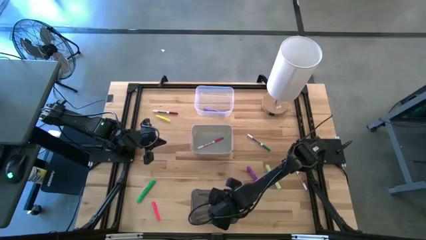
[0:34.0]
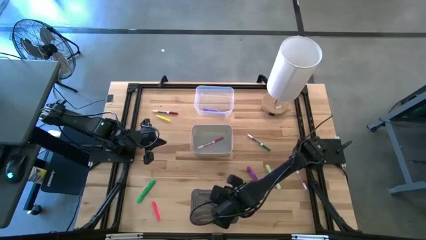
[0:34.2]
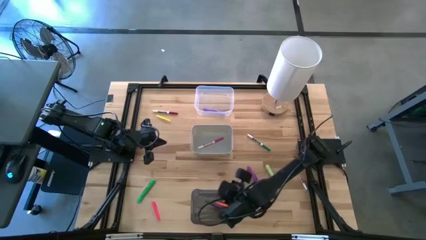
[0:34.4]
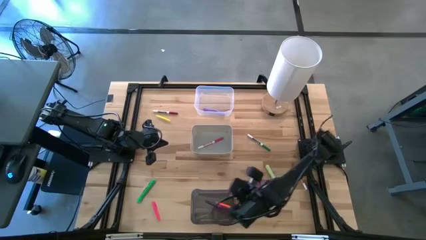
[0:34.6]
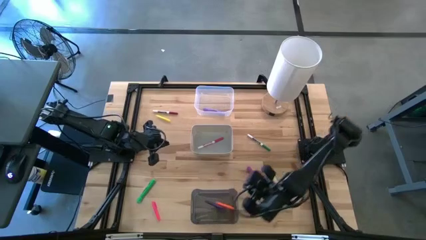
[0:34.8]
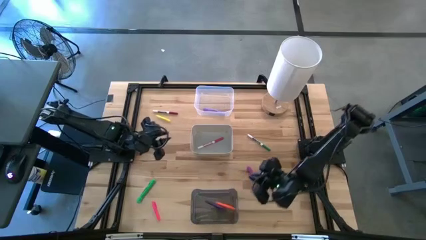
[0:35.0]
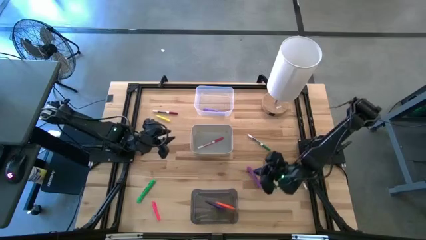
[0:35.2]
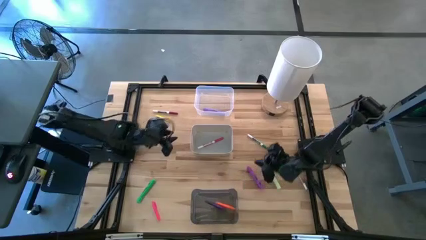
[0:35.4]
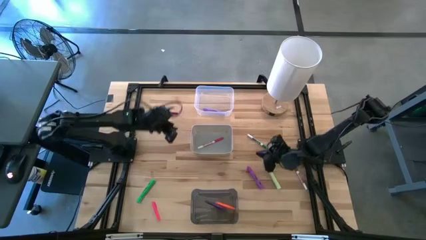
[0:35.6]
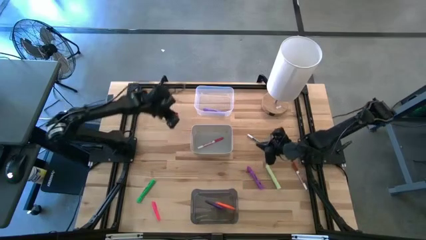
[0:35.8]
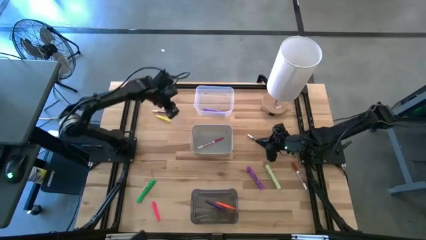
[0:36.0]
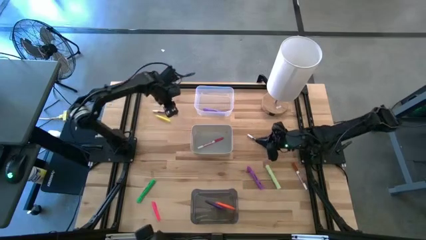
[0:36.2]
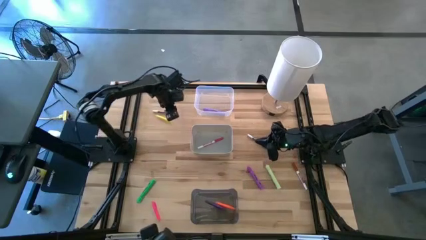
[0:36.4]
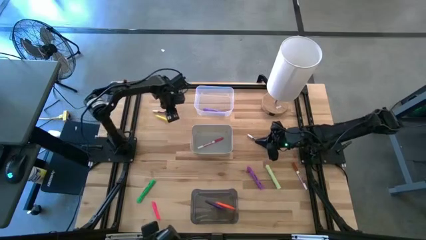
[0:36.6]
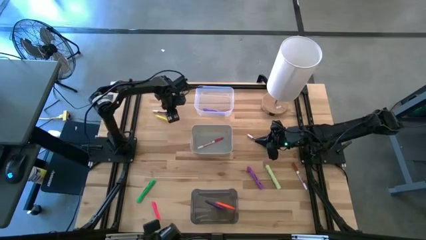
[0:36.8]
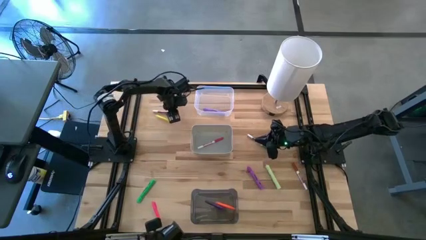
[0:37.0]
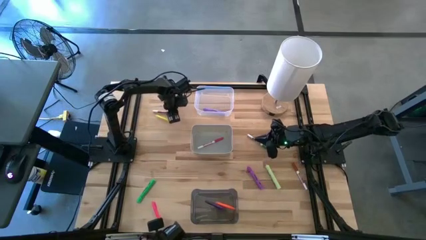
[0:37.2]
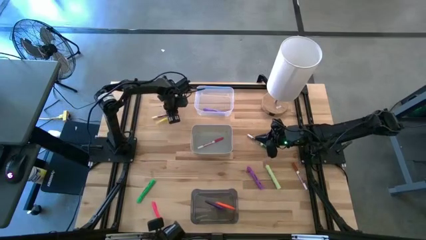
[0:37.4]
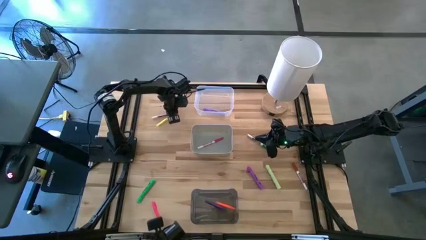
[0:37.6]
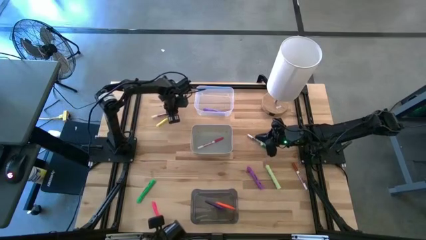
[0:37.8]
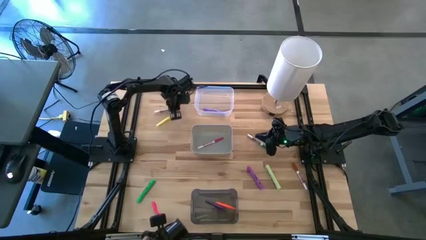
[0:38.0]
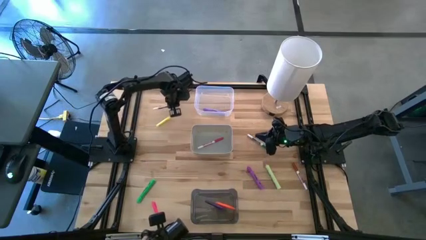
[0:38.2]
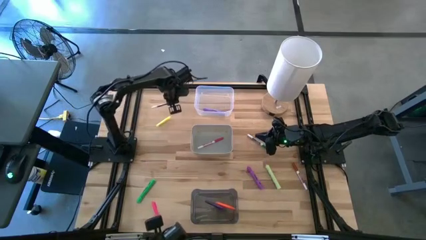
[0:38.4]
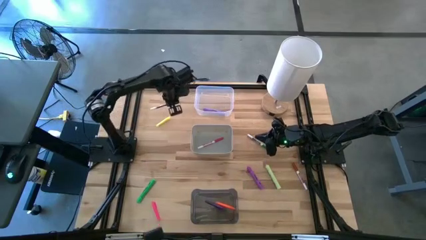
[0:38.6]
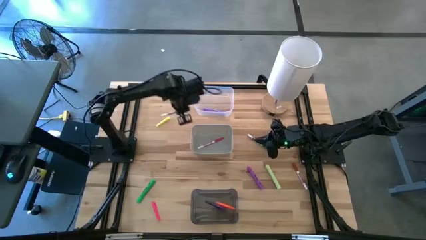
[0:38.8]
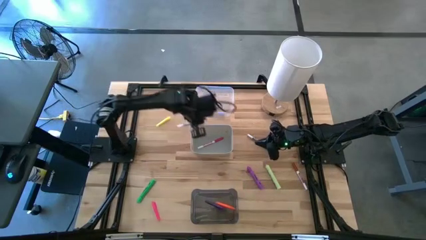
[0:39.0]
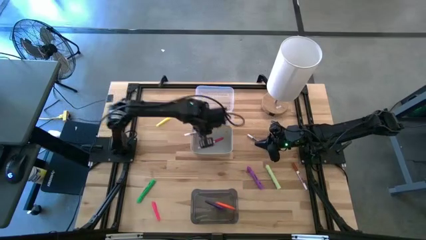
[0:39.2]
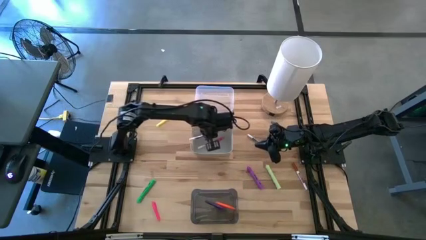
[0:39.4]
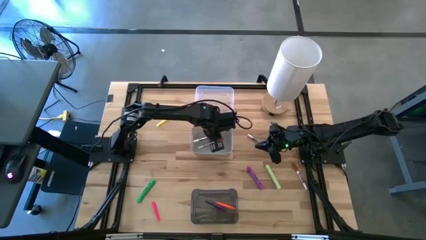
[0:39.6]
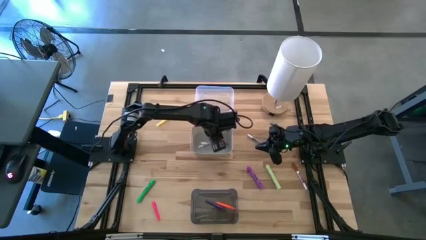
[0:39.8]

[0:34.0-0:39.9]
Task: Pick & Place Markers
Put the violet marker into the gray bin

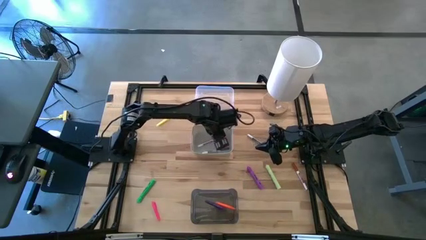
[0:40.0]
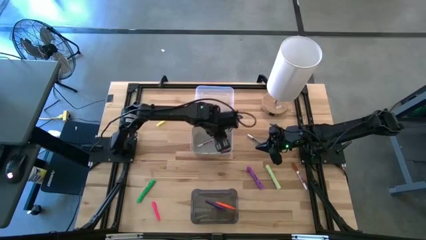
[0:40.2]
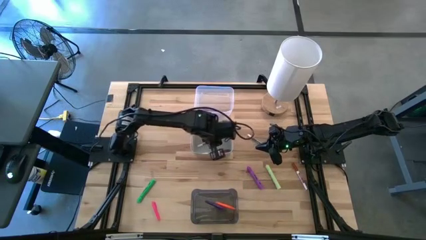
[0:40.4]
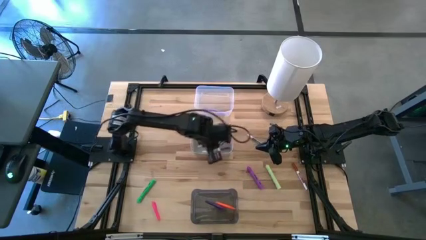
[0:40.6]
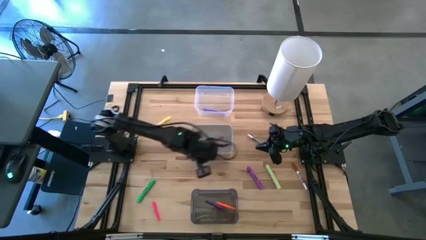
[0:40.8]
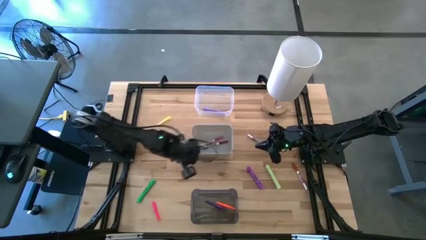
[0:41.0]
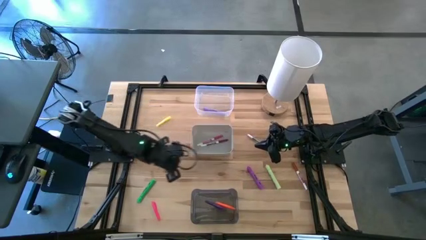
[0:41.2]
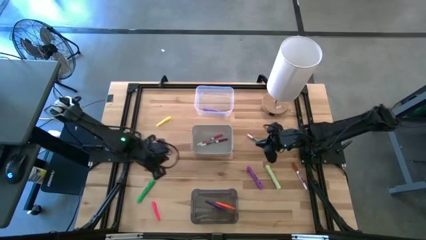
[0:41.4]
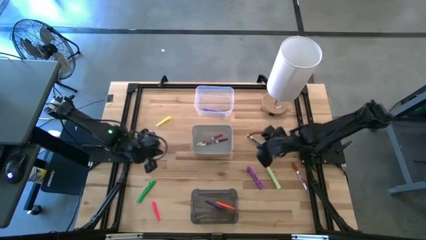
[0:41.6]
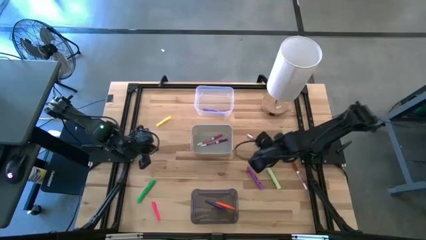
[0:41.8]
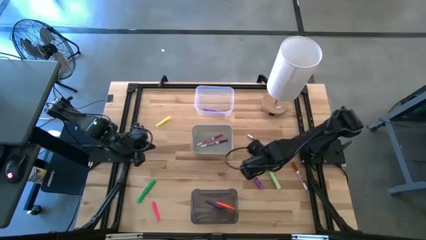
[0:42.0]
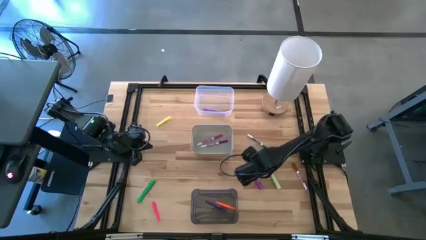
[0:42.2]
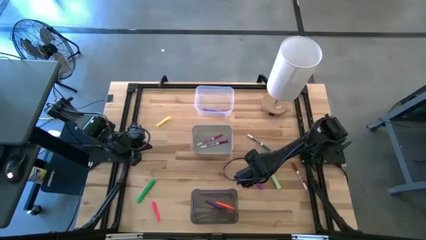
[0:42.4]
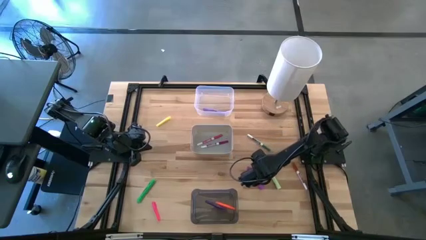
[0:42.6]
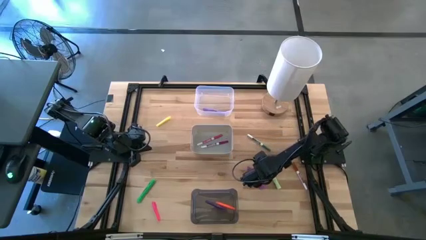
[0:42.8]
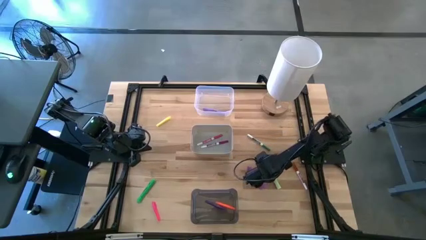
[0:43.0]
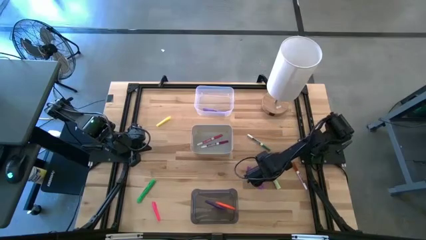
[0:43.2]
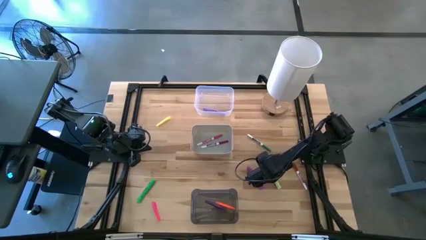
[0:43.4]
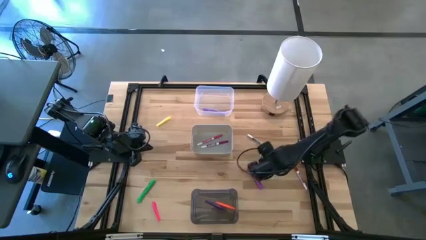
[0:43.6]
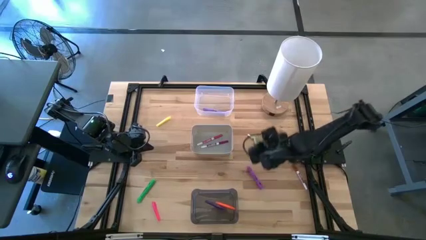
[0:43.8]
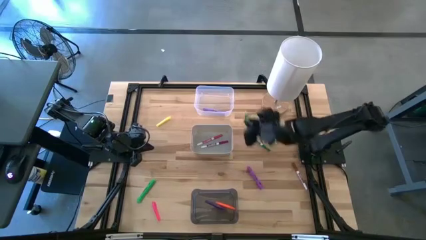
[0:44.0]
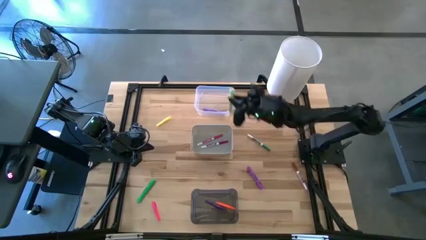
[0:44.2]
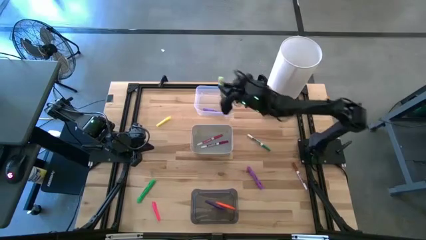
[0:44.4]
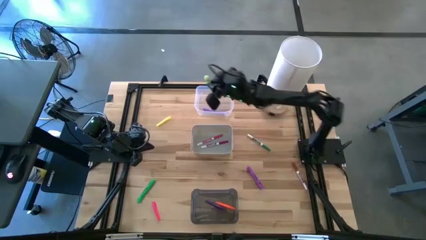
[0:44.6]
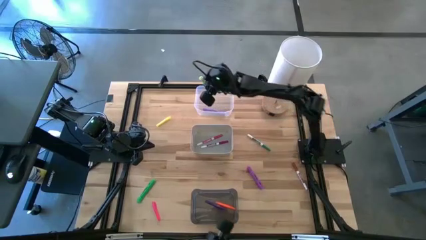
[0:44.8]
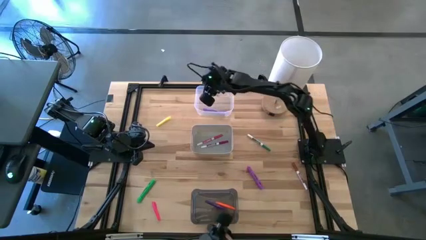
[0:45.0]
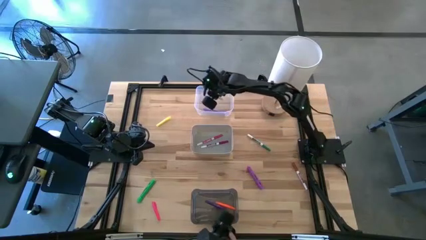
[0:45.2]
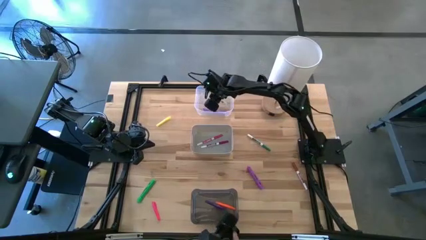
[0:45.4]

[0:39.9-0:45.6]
Put the yellow highlighter into the transparent bin

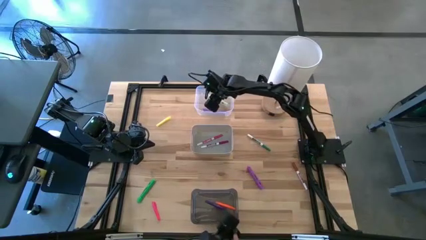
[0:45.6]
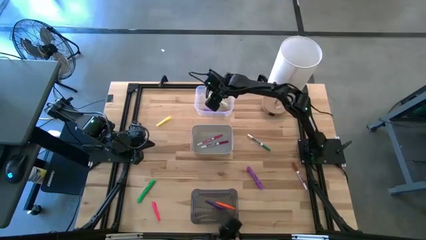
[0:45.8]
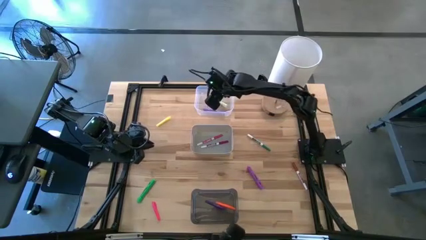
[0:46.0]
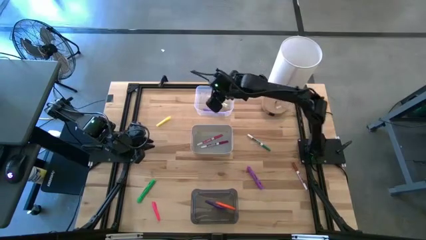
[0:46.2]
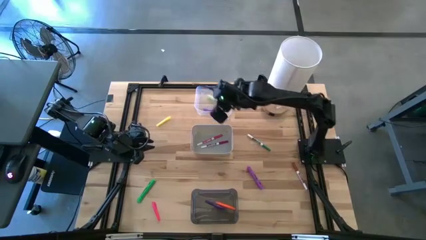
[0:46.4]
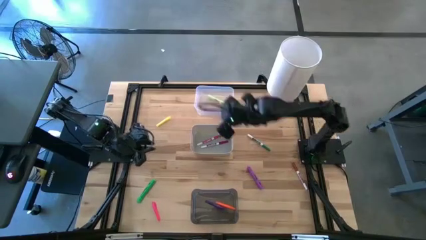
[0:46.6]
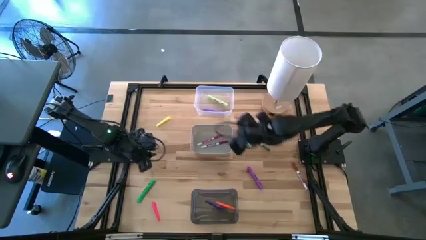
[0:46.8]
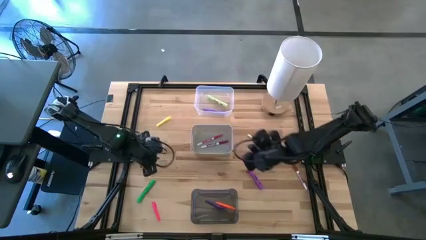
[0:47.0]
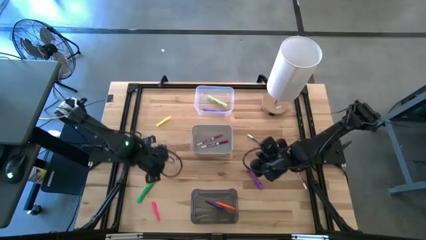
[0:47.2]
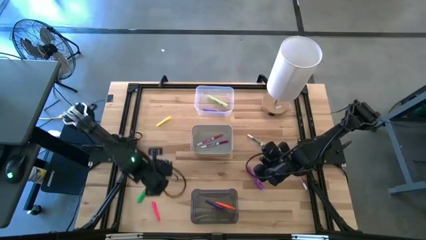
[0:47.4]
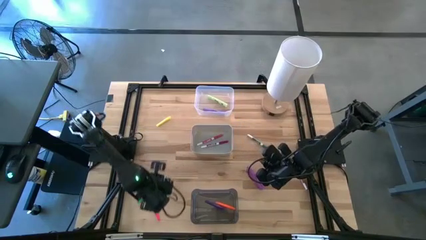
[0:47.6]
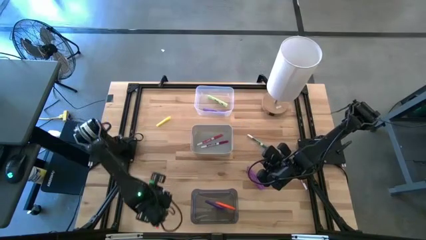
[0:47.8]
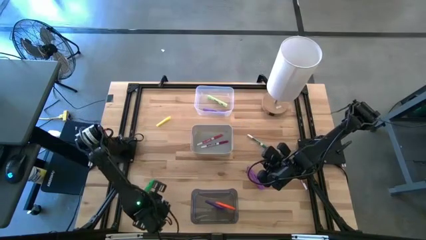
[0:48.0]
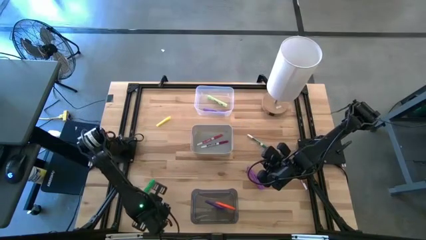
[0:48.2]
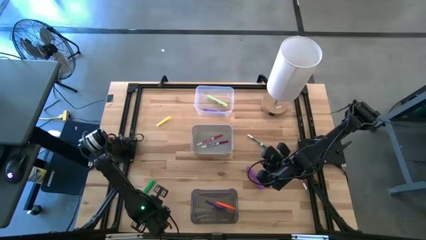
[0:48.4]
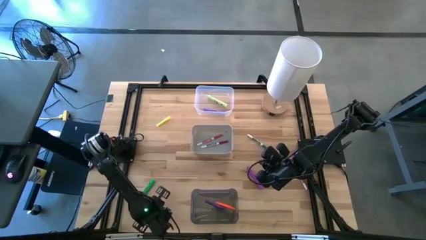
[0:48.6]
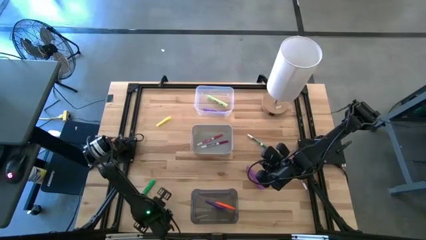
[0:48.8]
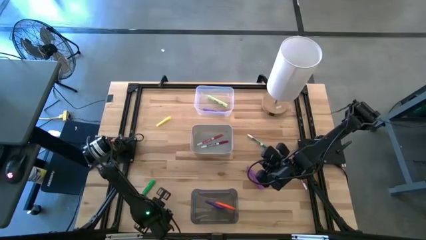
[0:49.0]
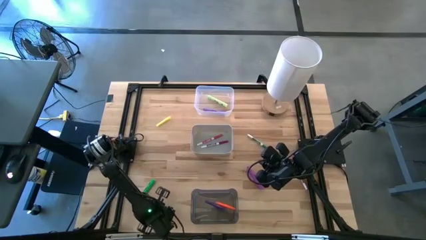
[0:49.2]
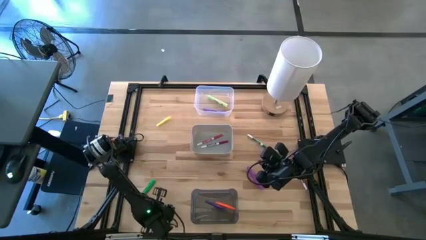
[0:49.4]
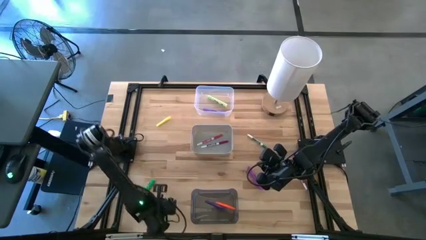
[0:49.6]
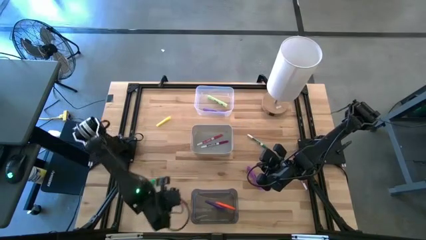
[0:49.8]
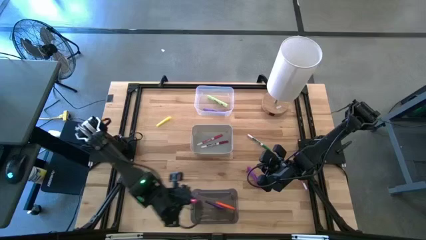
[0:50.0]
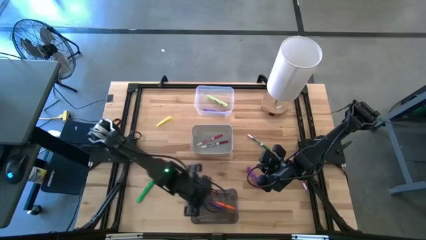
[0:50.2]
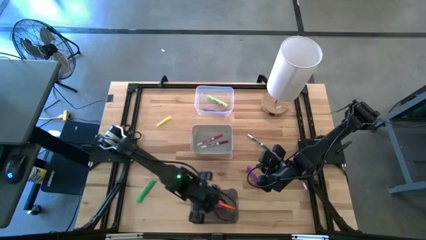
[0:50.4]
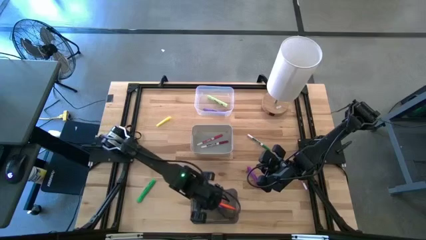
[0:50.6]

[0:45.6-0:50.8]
Put the pink pen into the black bin

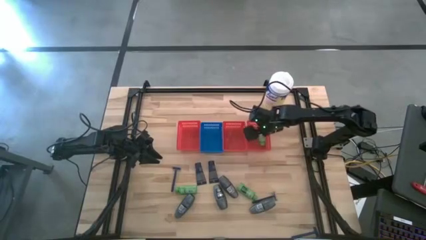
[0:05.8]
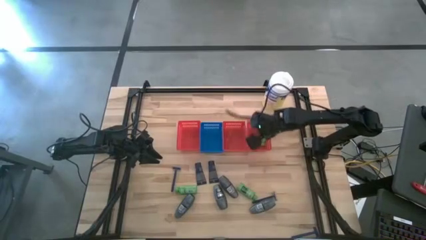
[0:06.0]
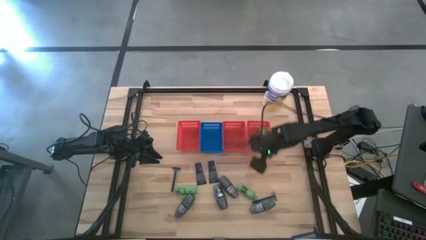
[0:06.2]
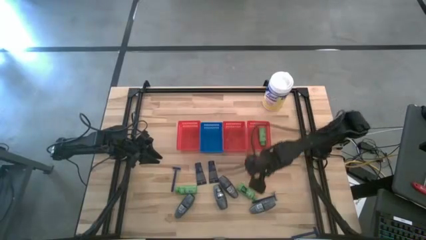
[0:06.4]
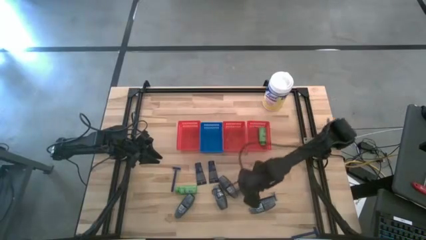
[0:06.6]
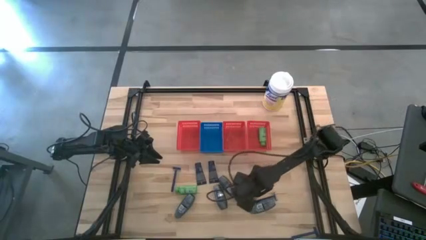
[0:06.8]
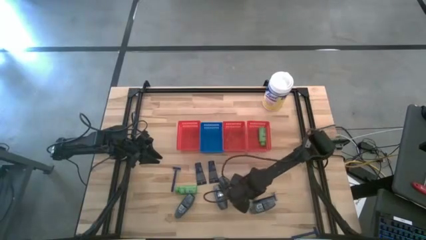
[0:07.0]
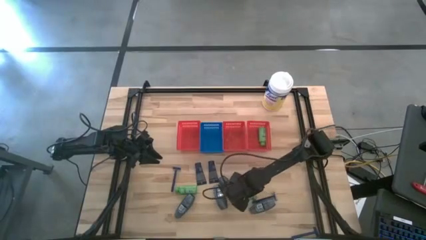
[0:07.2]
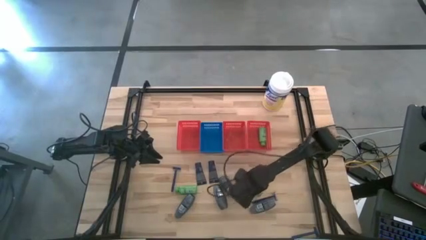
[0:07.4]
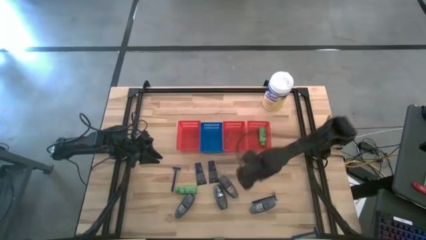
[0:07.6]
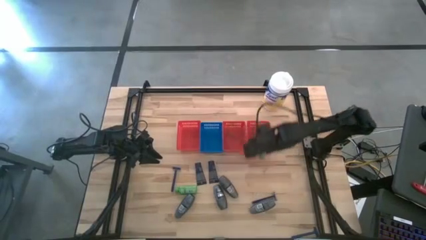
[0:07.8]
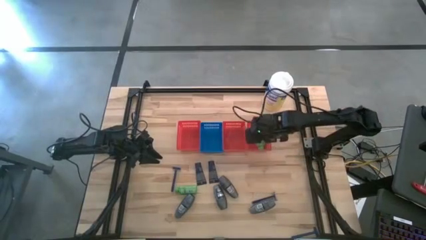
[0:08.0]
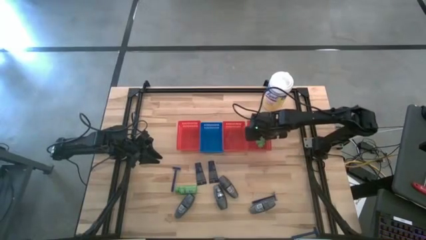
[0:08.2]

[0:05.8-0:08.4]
Task: Pick & Place Travel size toiletries
Put the green shampoo into the right red basket
